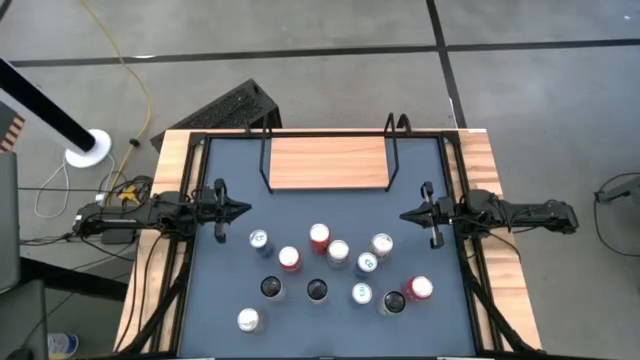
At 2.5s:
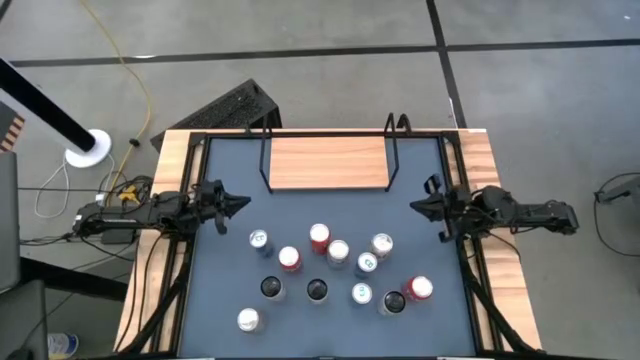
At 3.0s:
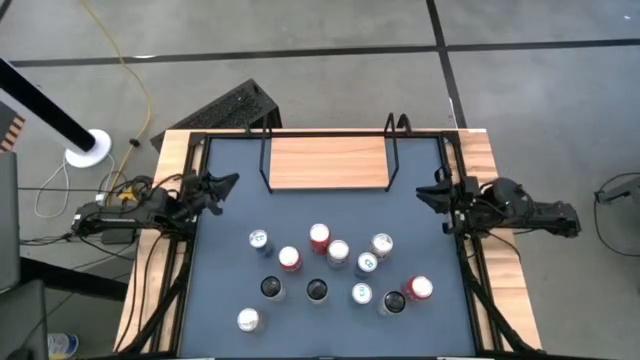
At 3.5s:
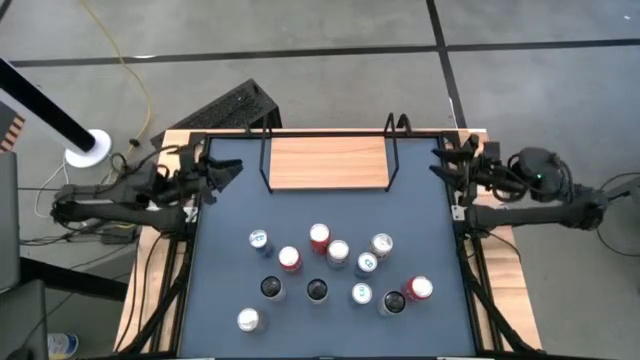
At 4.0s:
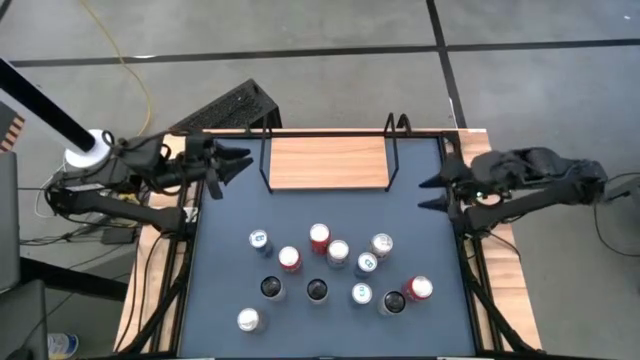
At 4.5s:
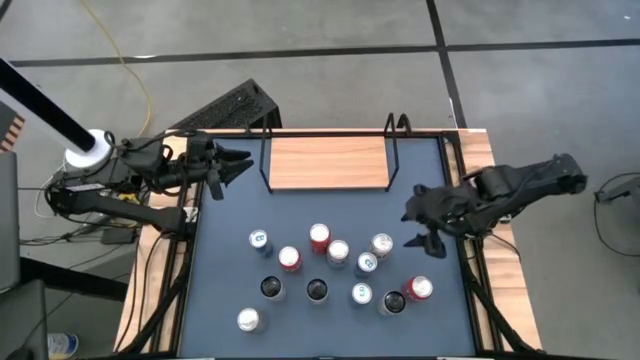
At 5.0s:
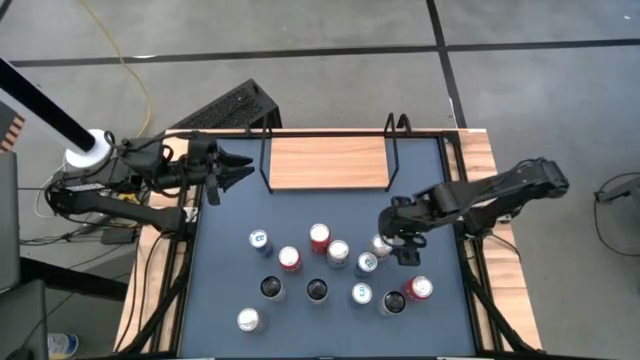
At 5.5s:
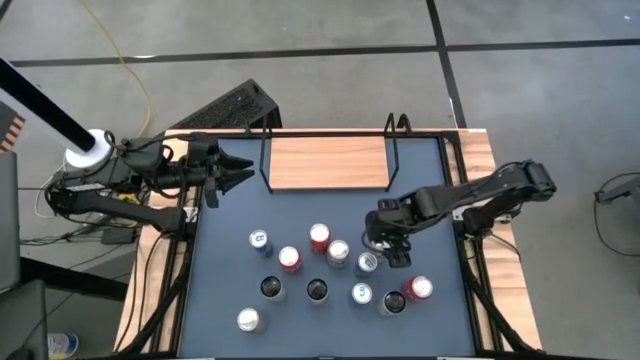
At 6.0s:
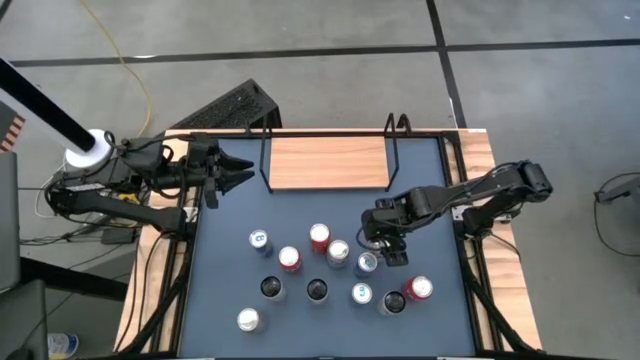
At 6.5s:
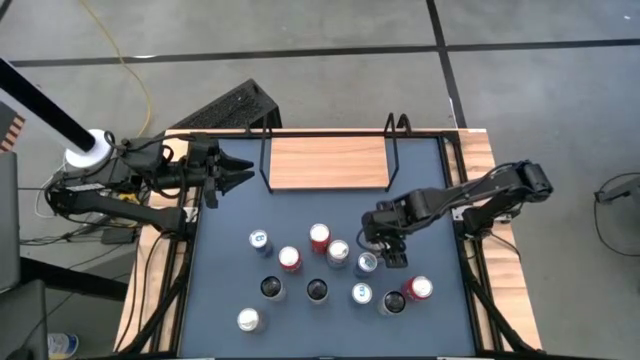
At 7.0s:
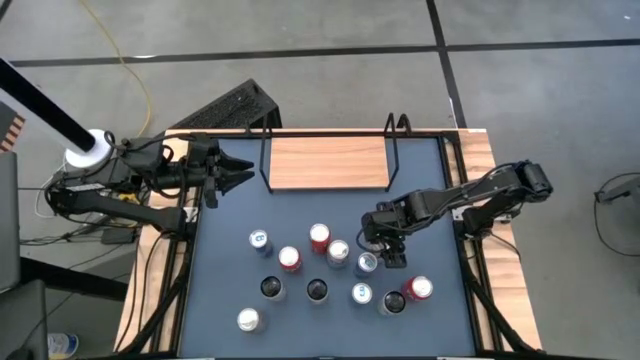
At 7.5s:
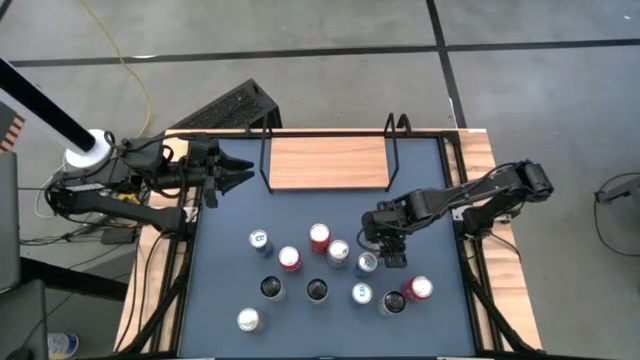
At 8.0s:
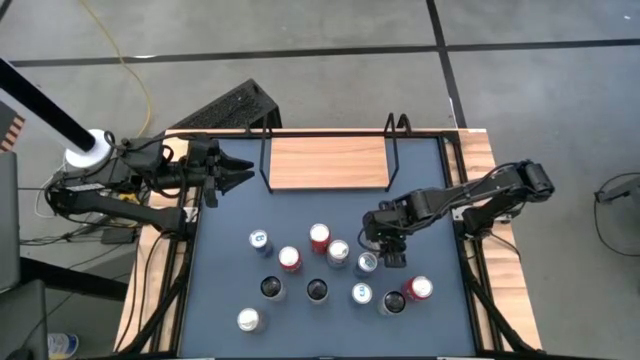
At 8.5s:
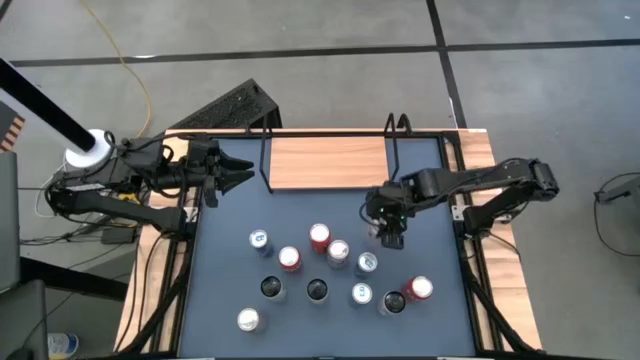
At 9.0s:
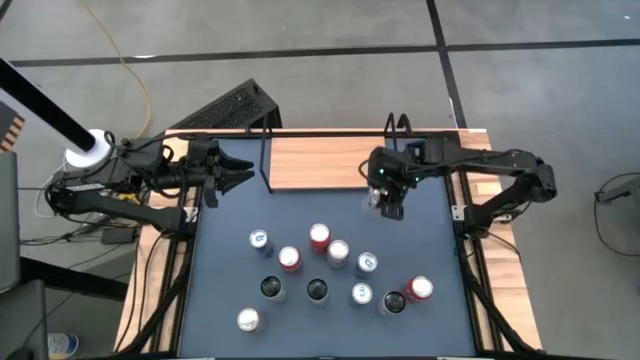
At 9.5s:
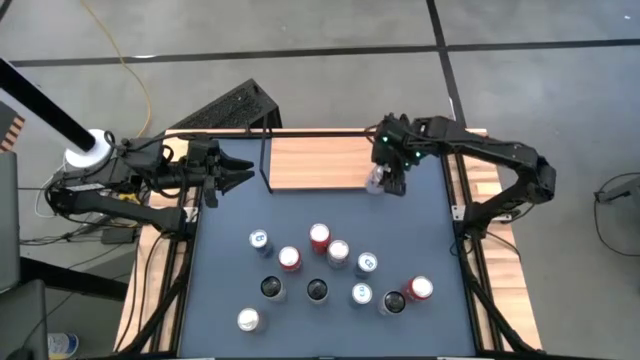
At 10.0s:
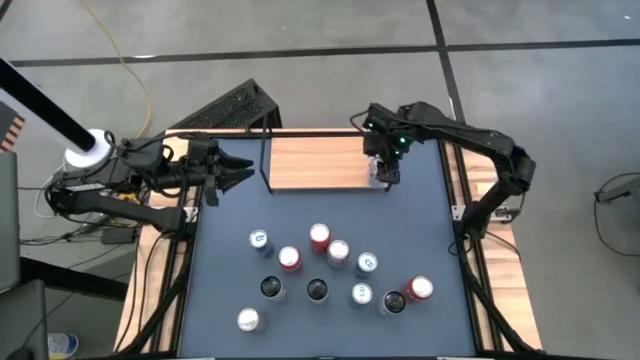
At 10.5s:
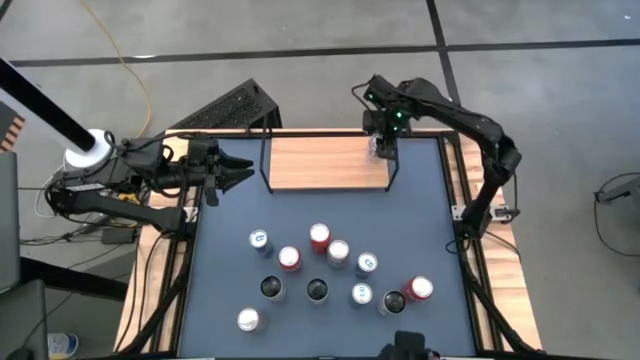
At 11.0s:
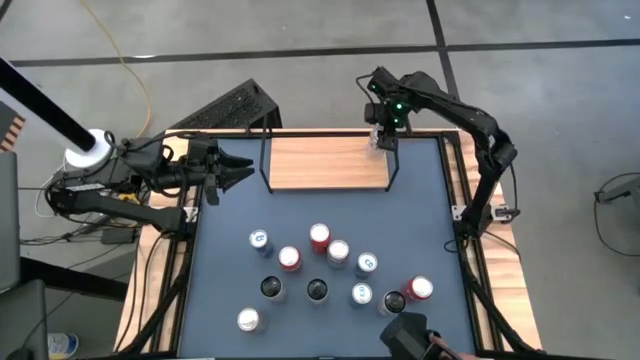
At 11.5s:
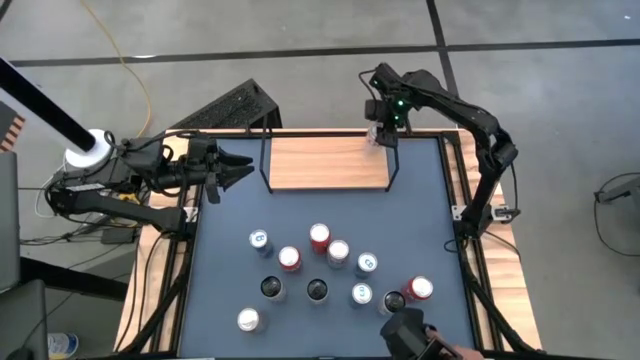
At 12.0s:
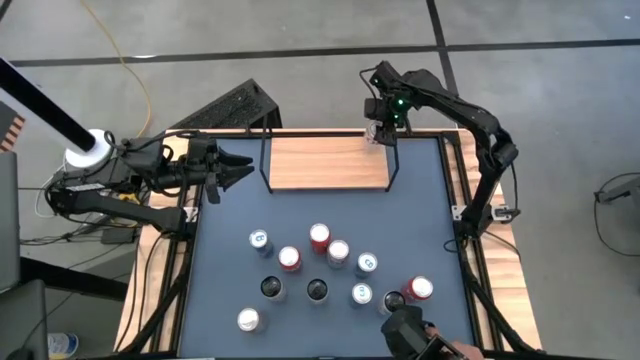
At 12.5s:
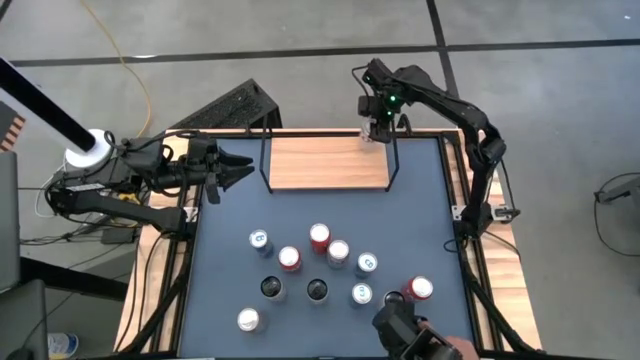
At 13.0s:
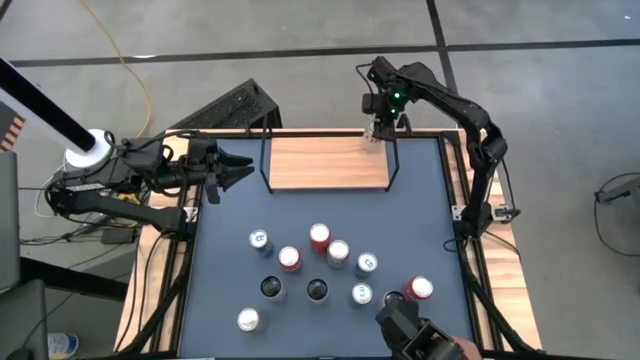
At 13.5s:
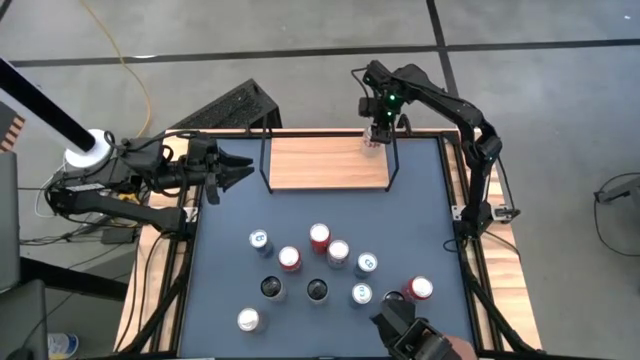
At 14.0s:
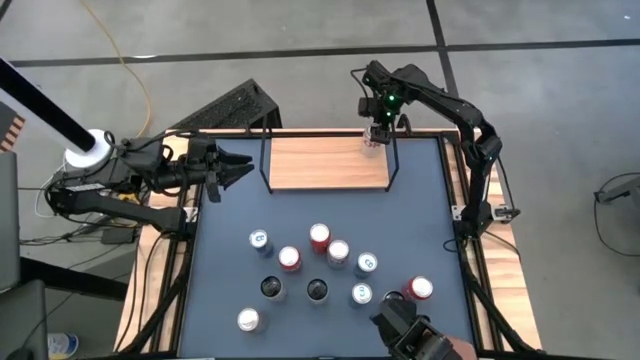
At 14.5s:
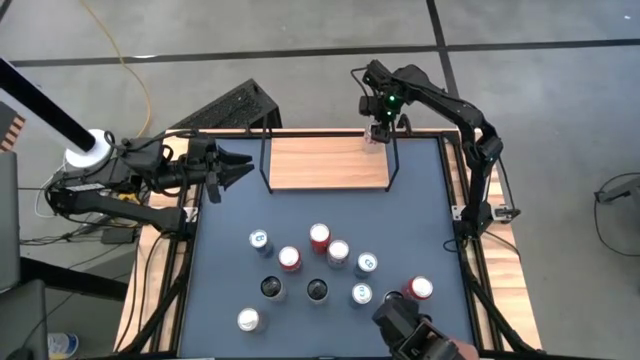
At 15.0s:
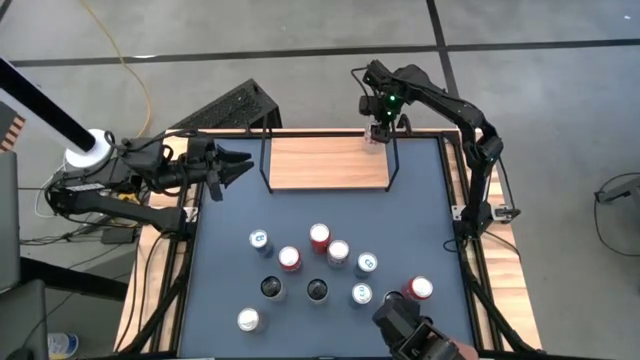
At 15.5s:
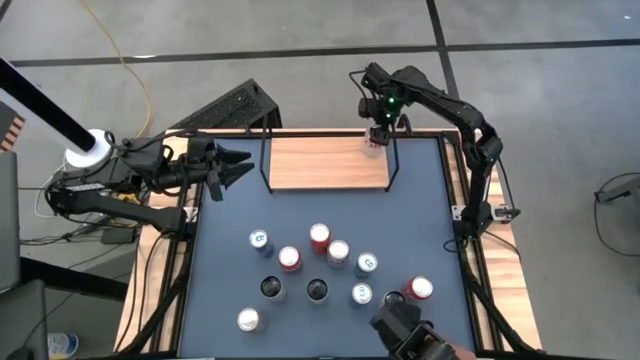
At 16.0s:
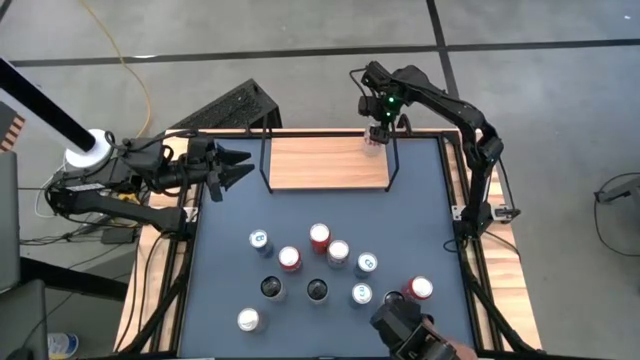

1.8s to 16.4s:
Task: Place canned beverage on shelf
Put the right silver soda can on the shelf

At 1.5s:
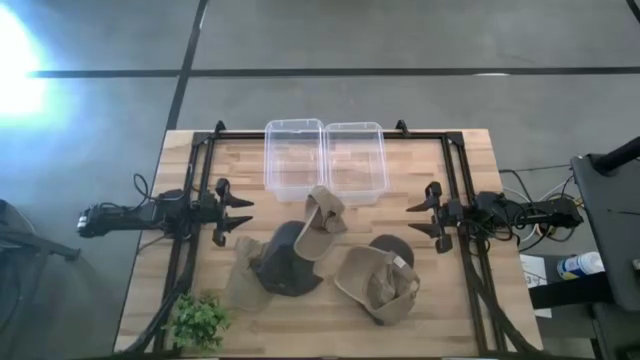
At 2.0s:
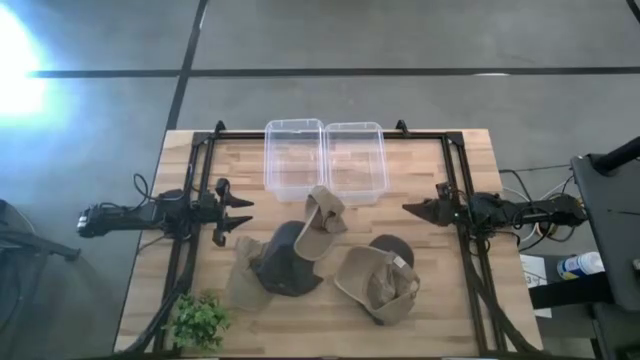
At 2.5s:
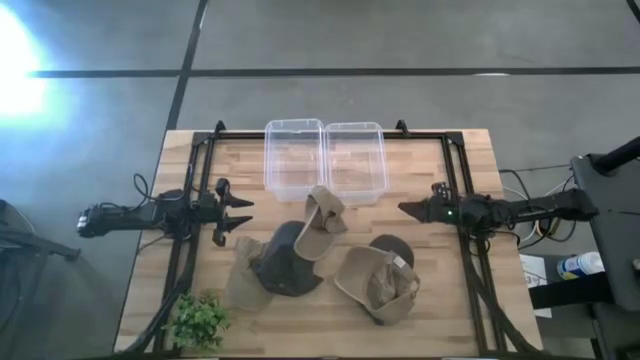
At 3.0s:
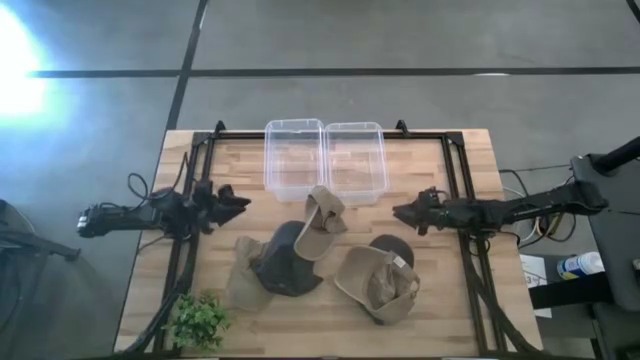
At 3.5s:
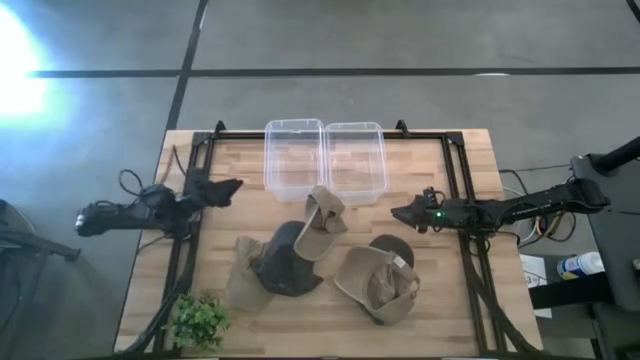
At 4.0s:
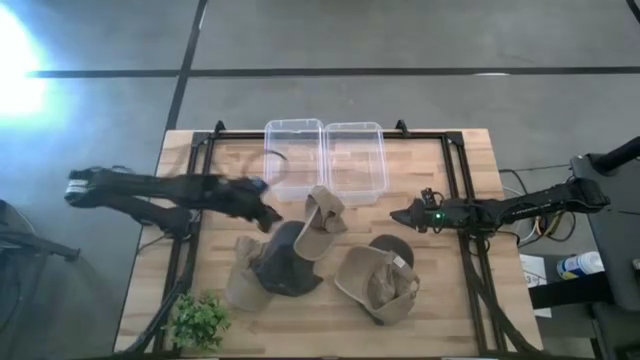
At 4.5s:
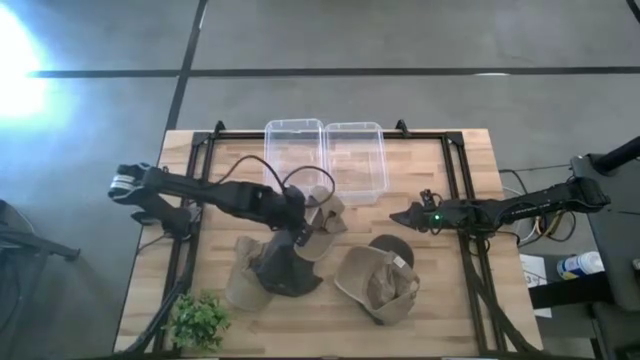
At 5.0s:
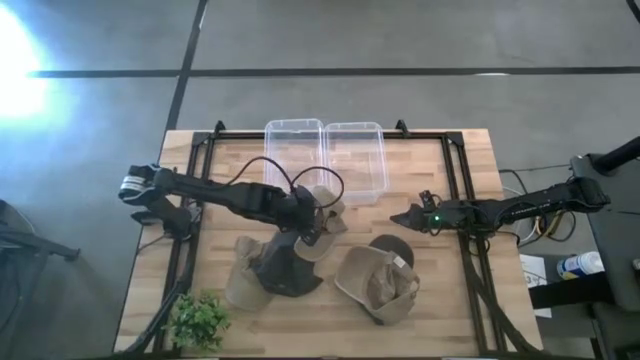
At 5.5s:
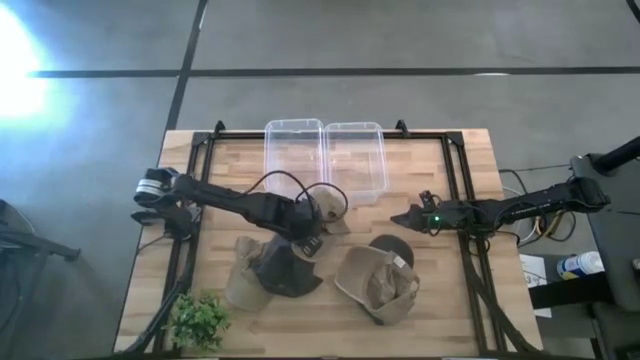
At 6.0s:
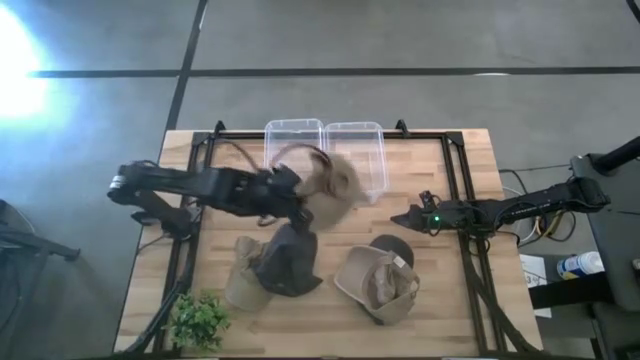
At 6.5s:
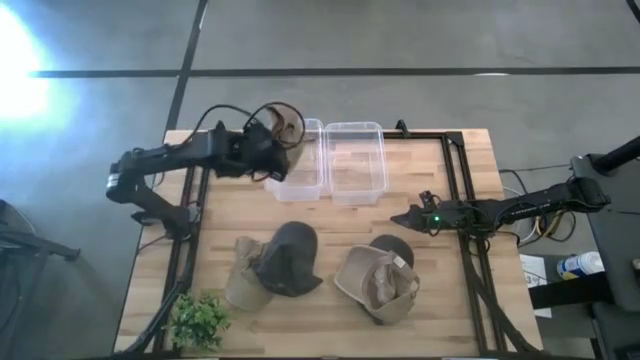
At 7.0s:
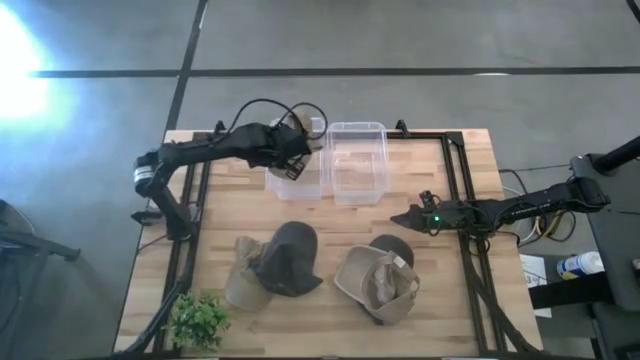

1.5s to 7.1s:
Task: Pick & Place hat
Put the middle brown cap into the left transparent bin
